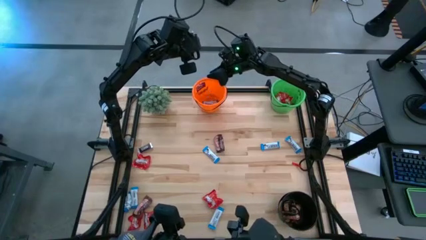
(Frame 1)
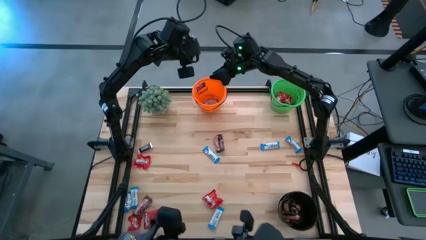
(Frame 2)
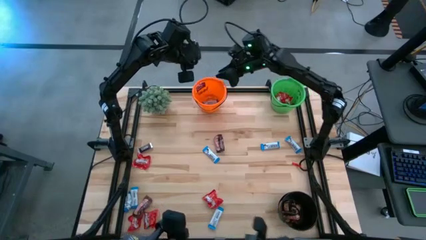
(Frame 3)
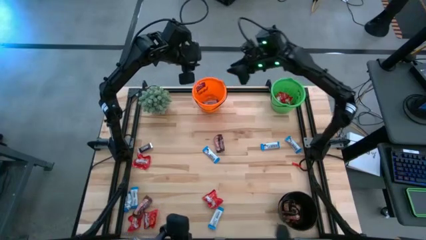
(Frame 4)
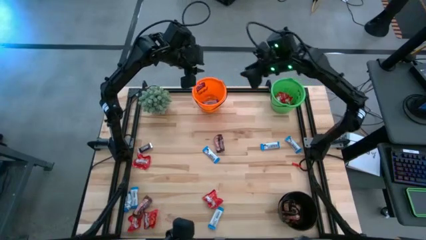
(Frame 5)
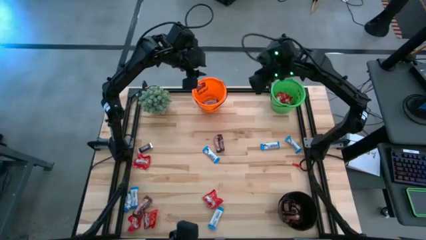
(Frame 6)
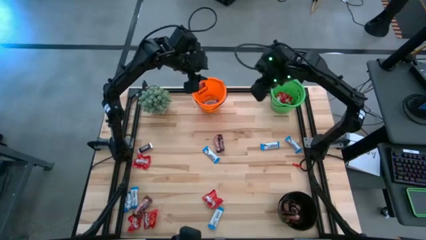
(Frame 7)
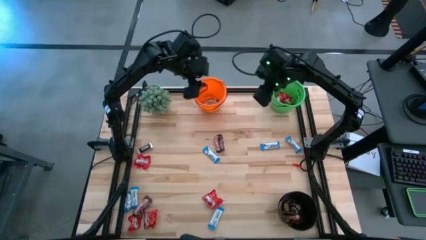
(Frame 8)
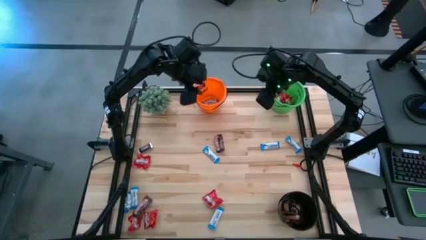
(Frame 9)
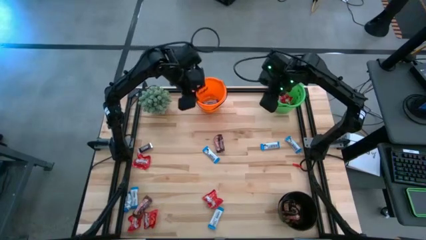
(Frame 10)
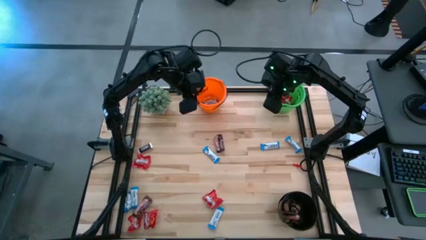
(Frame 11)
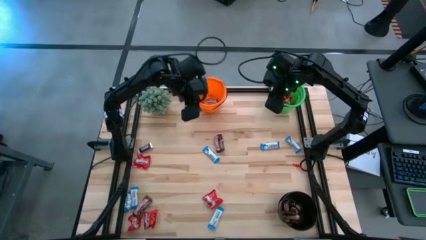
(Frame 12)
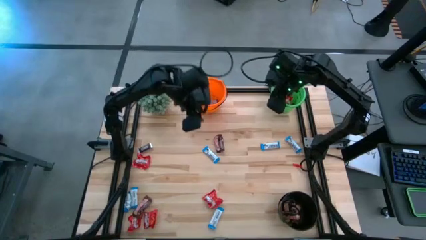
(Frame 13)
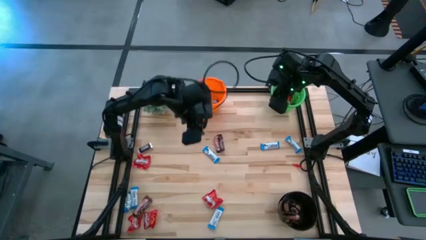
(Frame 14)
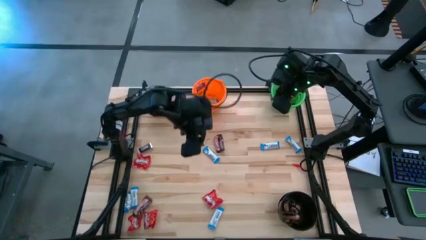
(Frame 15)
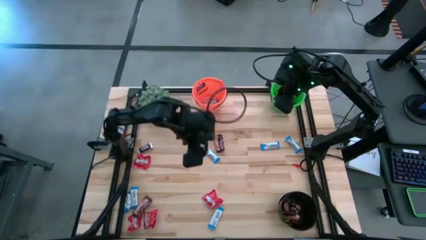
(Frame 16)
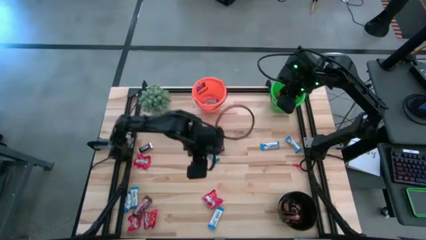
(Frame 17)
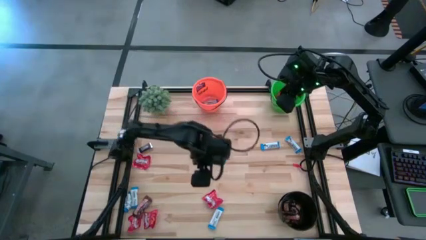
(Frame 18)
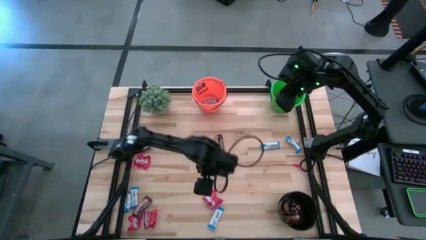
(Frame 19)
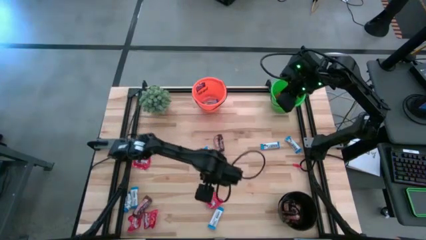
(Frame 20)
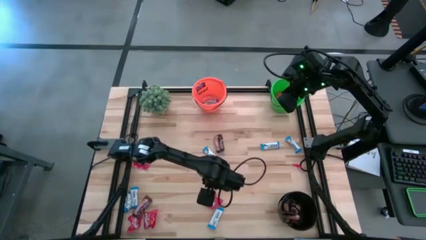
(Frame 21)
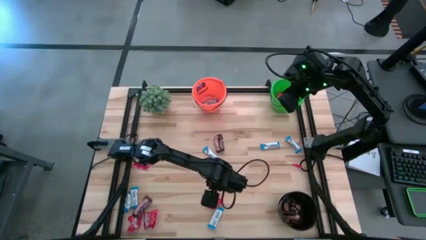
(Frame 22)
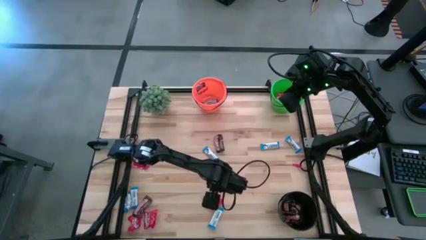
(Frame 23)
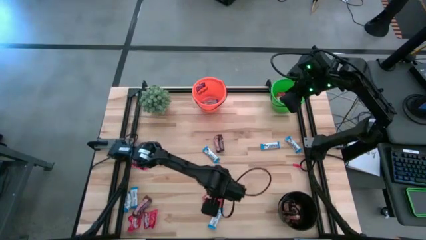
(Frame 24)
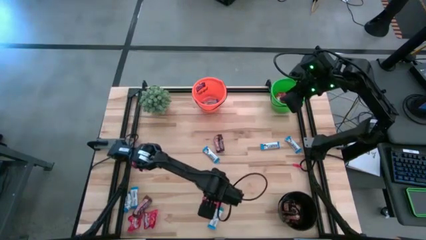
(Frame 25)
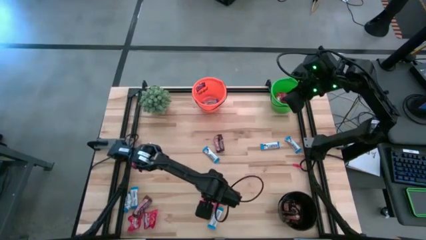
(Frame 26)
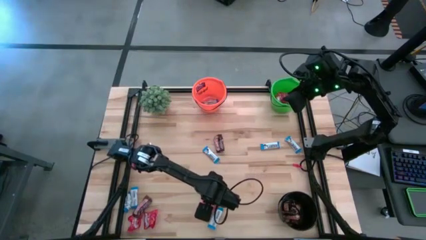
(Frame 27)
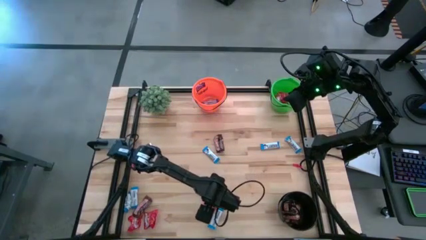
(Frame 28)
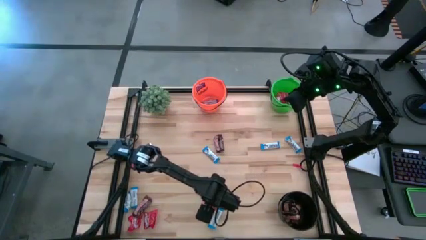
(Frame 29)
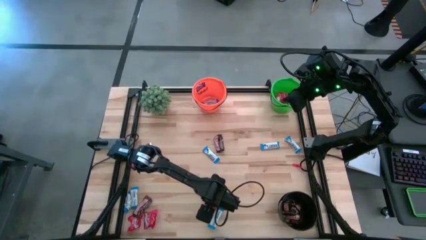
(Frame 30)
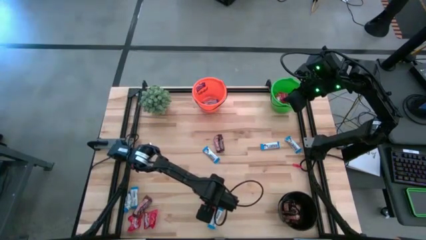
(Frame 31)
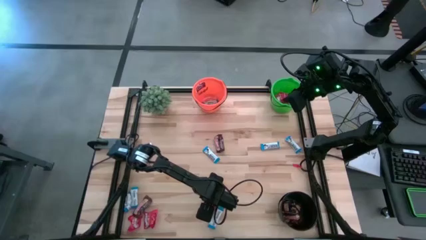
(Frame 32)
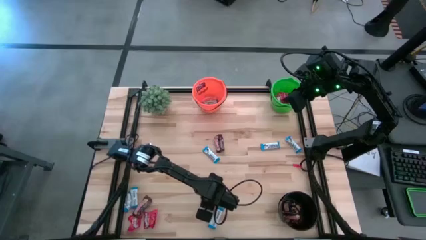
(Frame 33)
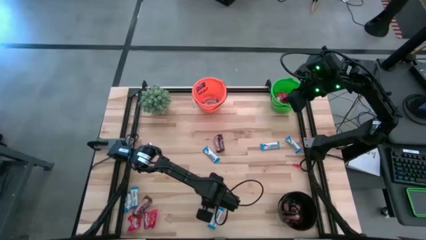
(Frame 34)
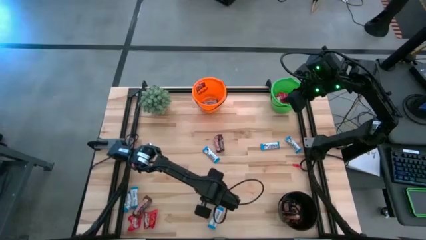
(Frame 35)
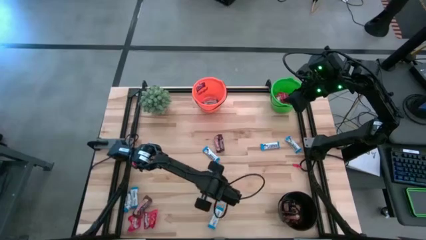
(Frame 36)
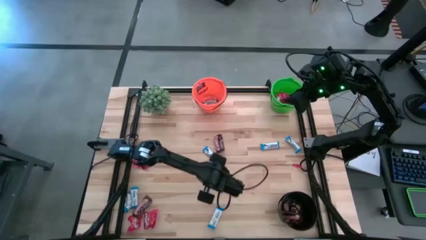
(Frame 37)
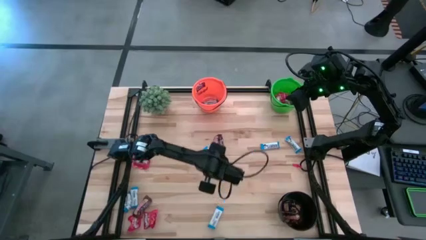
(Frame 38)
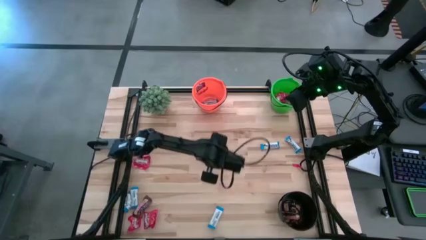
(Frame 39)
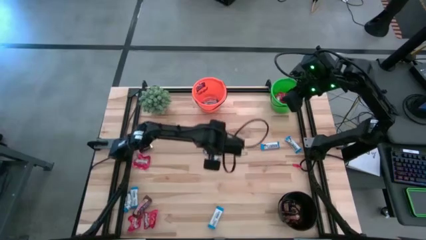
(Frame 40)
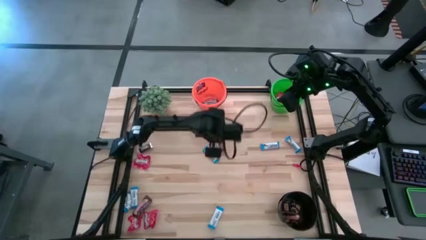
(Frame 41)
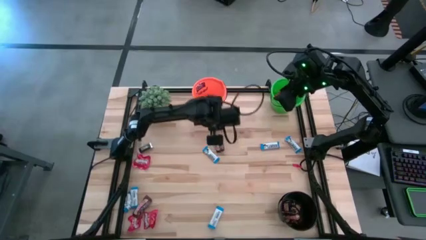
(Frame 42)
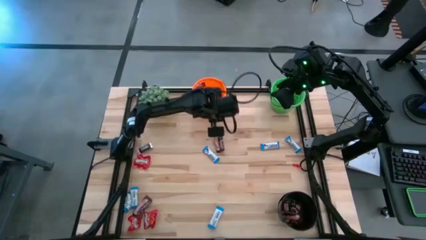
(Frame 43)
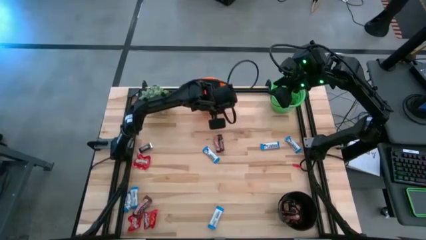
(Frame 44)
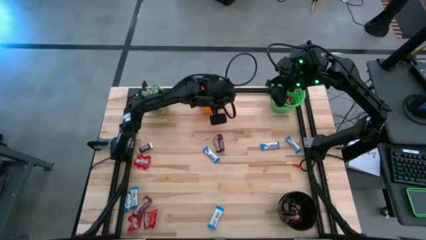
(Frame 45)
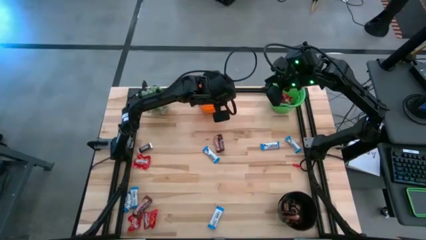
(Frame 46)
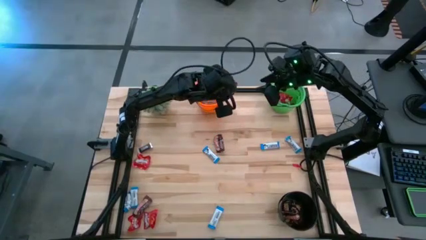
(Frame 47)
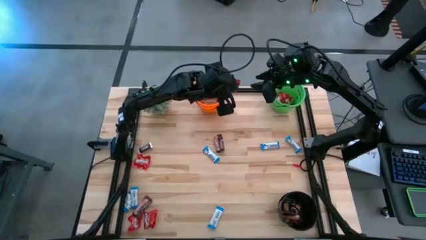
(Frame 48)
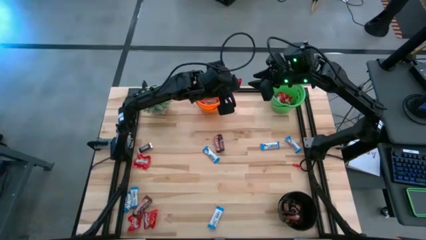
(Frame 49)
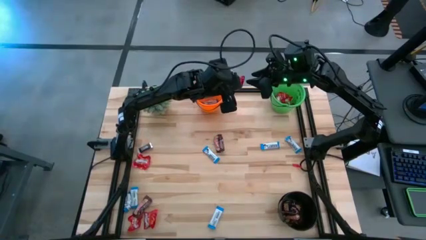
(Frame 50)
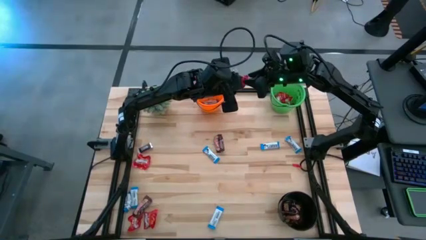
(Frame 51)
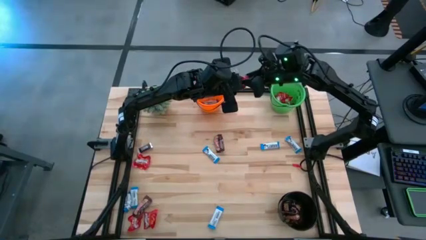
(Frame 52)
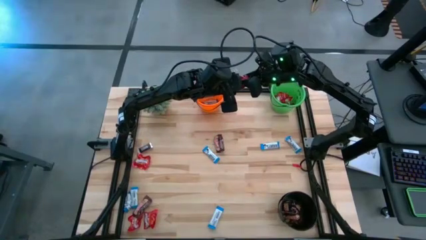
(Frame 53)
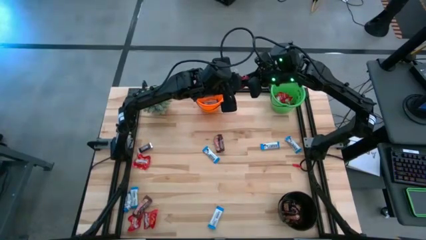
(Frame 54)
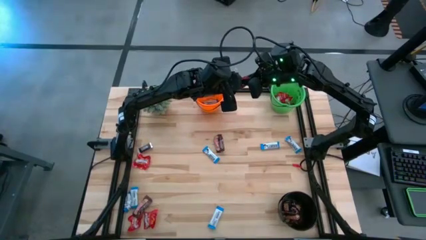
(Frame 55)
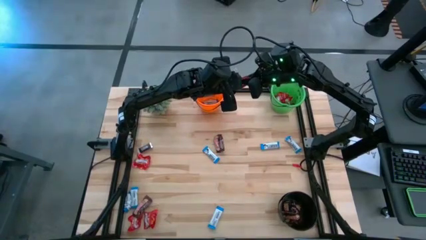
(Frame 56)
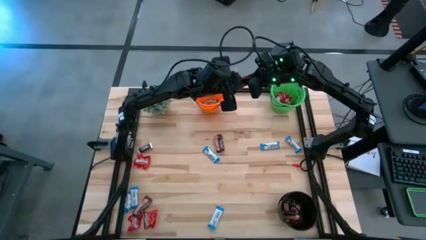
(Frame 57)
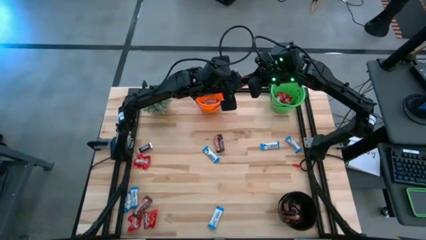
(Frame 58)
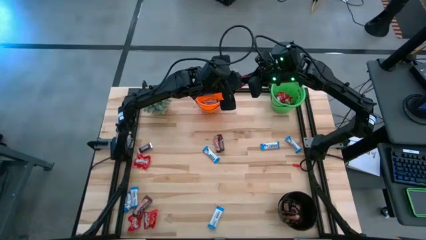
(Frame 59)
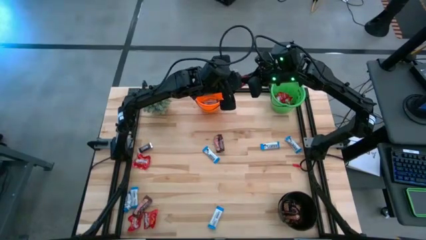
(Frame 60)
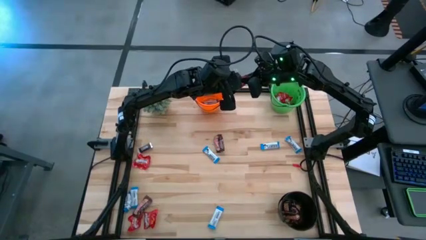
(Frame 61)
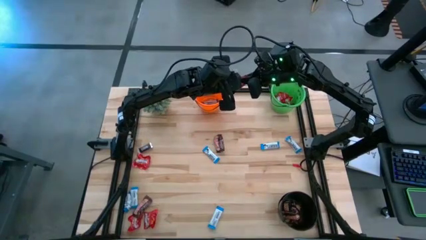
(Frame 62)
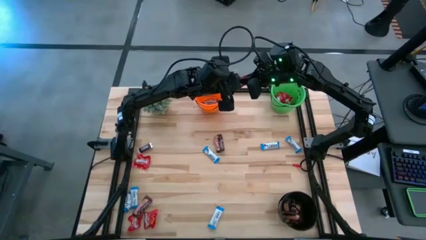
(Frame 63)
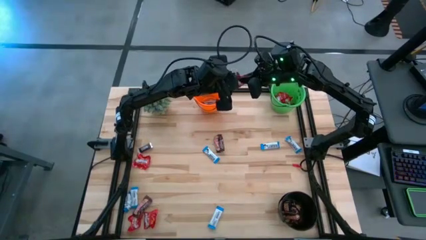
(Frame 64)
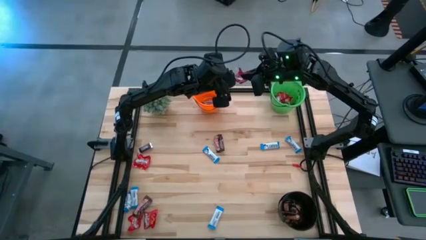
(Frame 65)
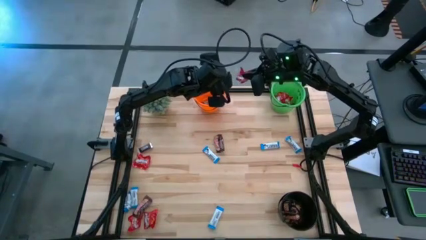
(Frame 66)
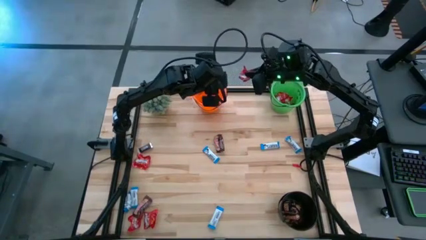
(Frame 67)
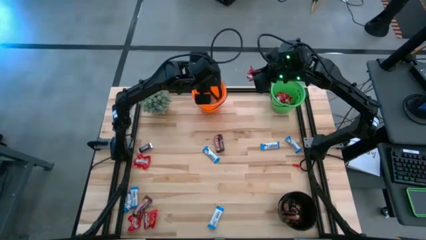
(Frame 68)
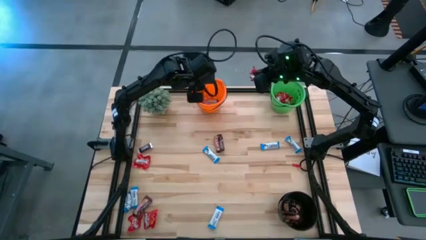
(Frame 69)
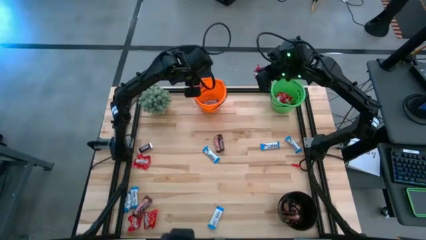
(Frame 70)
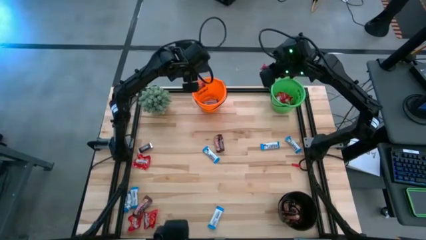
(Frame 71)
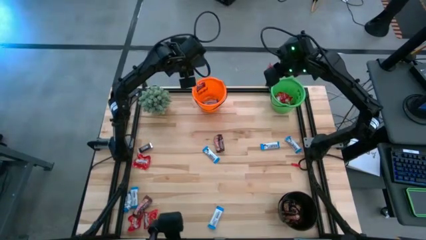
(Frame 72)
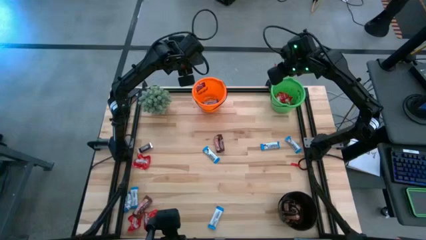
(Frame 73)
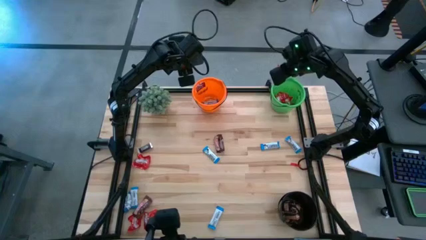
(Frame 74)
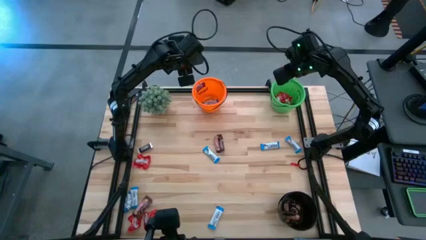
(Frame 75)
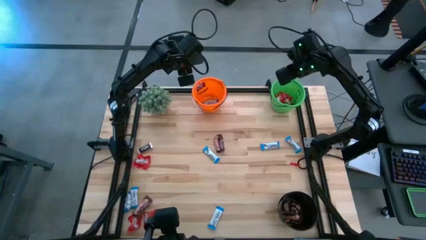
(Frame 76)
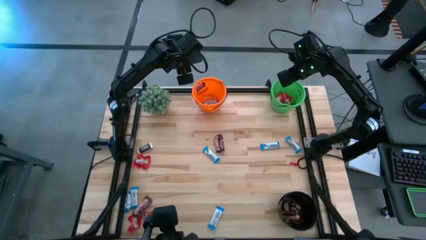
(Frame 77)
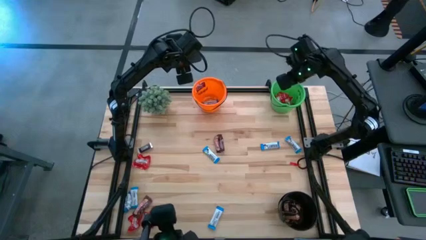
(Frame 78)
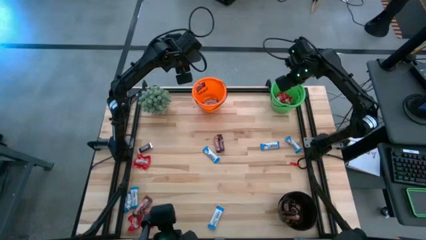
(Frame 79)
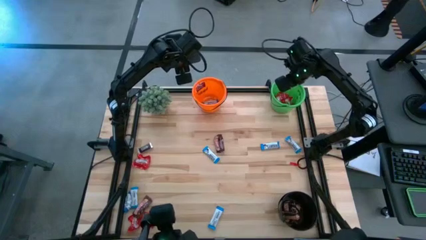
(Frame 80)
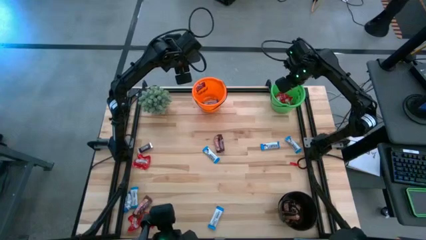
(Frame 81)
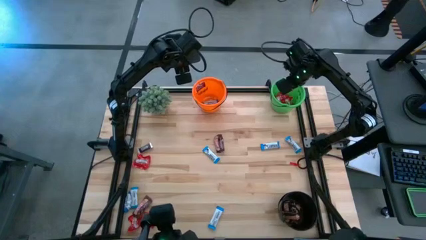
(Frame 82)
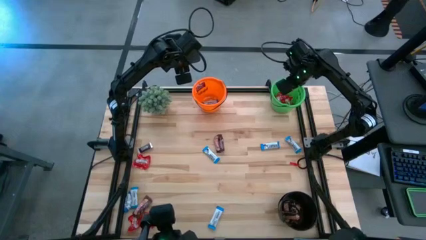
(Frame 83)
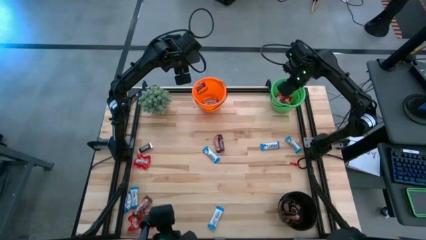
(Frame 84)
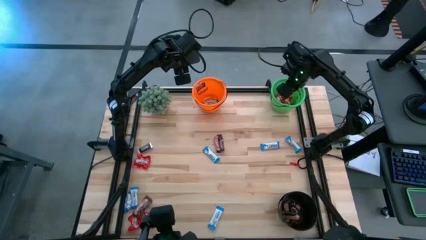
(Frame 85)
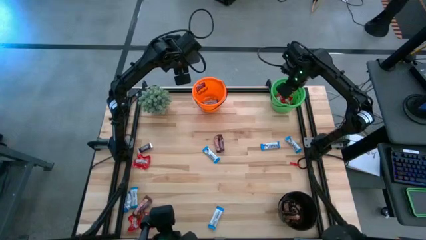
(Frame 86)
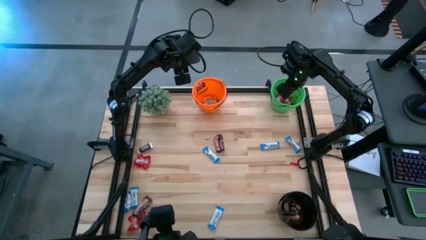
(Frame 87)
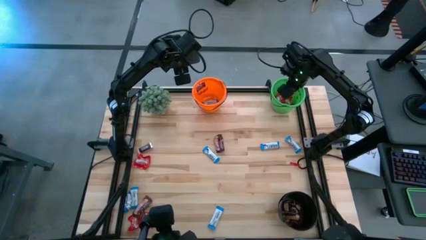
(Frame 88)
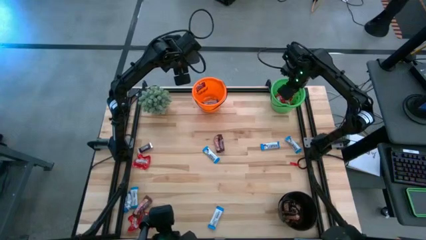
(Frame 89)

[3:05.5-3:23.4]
Task: Organize candy in baskets
Put the red candy into the green bucket
